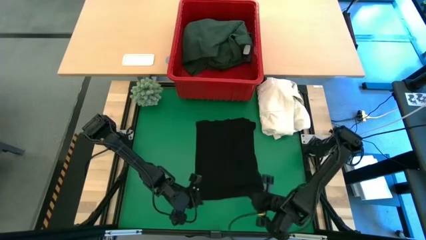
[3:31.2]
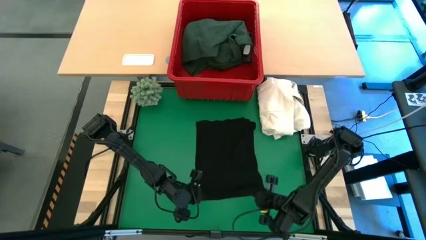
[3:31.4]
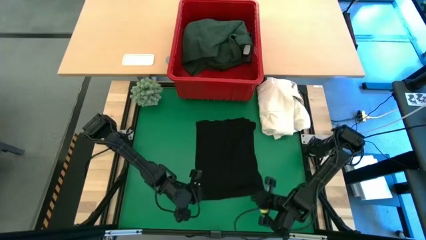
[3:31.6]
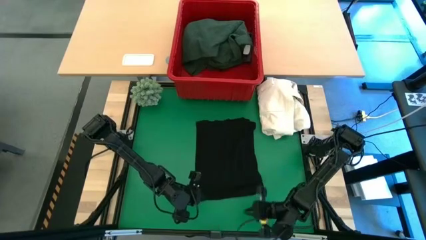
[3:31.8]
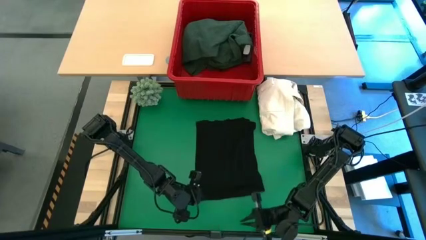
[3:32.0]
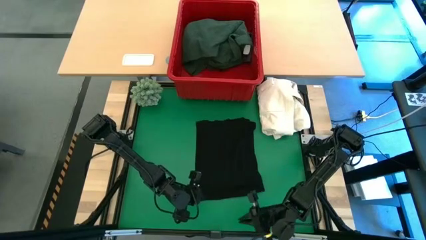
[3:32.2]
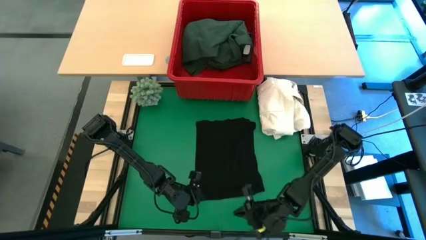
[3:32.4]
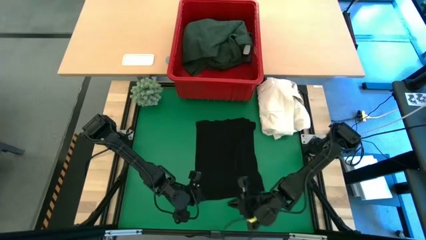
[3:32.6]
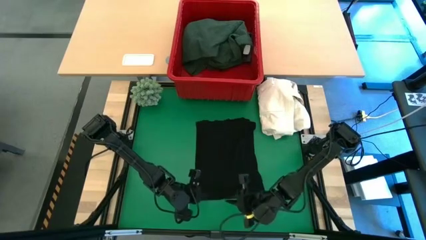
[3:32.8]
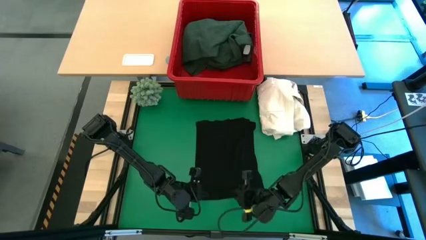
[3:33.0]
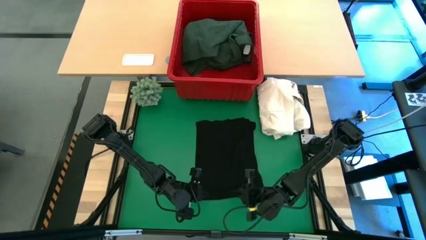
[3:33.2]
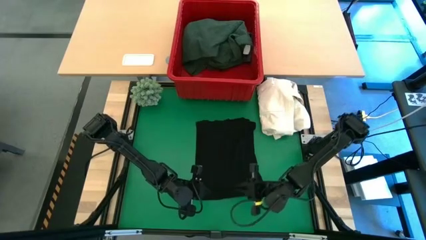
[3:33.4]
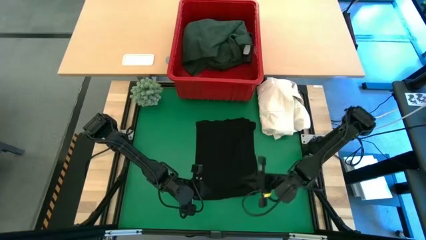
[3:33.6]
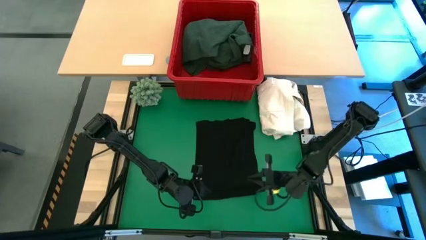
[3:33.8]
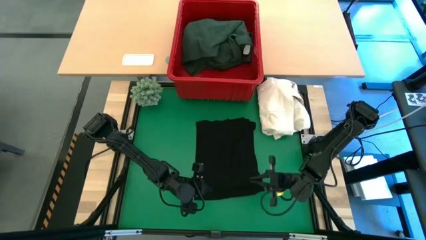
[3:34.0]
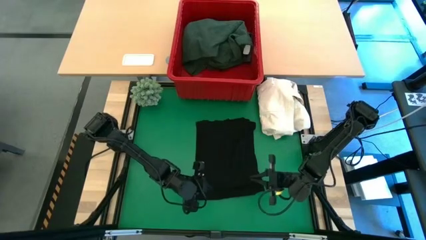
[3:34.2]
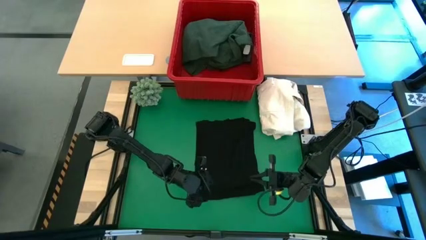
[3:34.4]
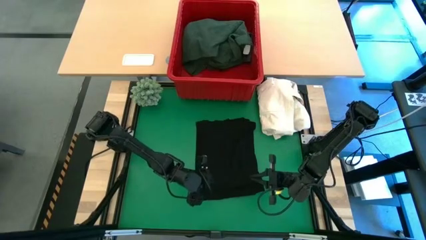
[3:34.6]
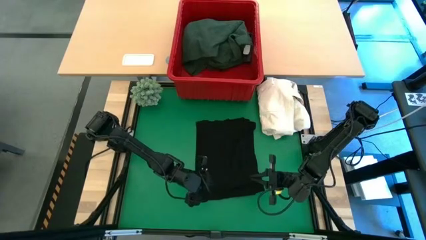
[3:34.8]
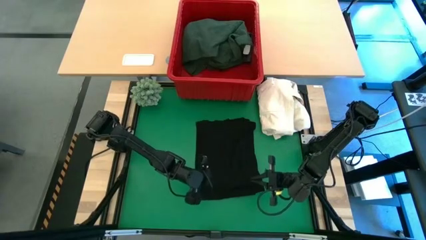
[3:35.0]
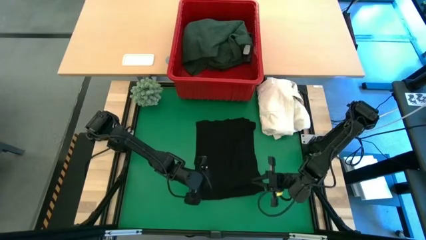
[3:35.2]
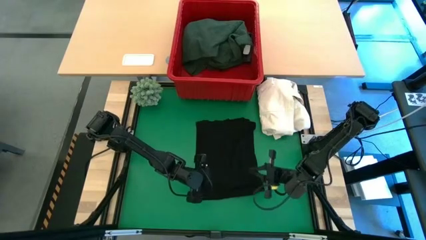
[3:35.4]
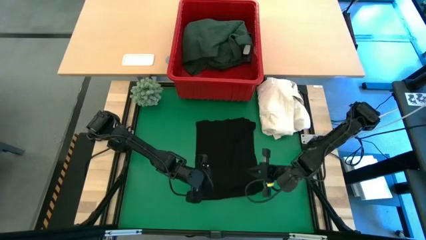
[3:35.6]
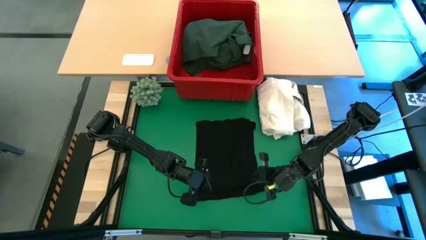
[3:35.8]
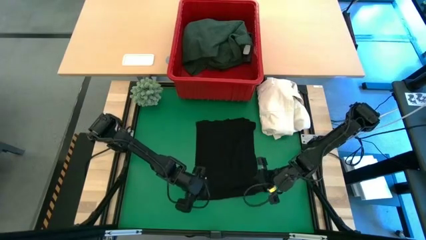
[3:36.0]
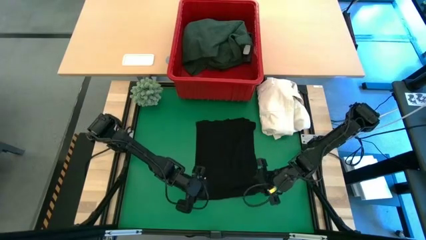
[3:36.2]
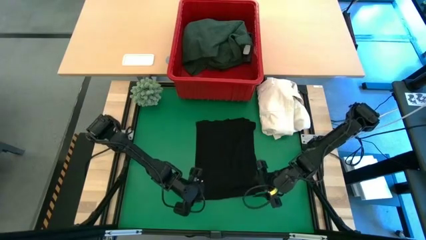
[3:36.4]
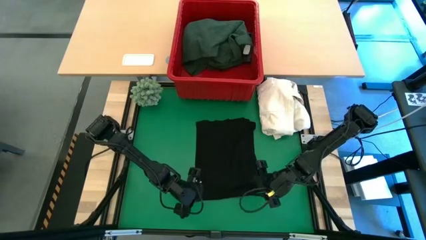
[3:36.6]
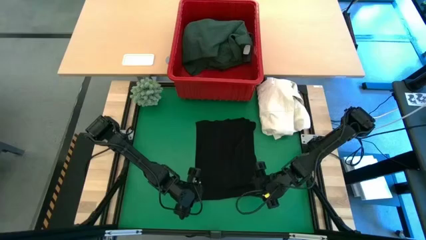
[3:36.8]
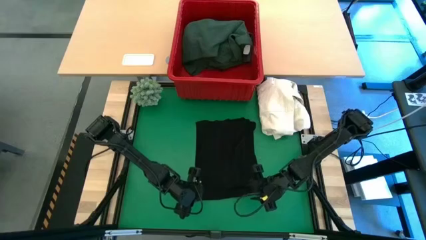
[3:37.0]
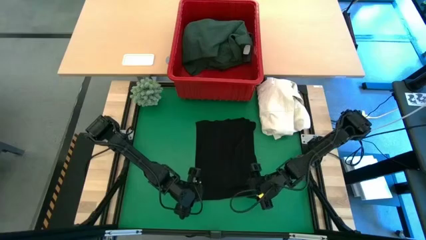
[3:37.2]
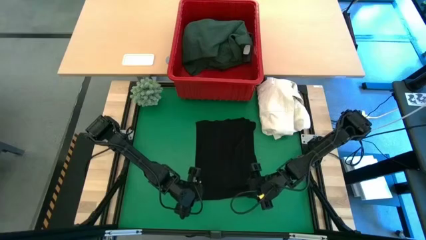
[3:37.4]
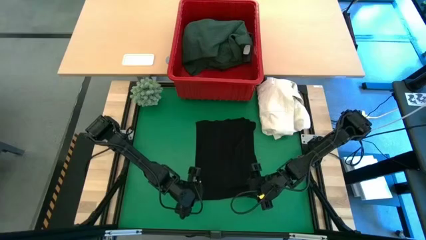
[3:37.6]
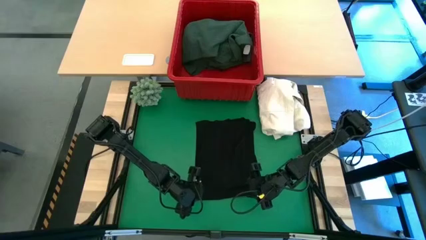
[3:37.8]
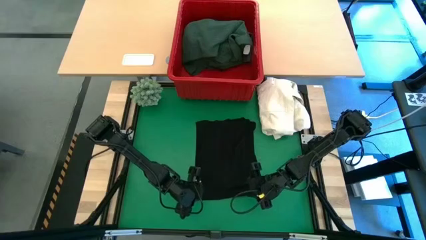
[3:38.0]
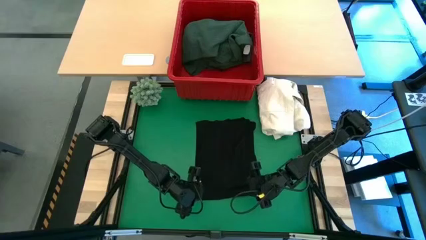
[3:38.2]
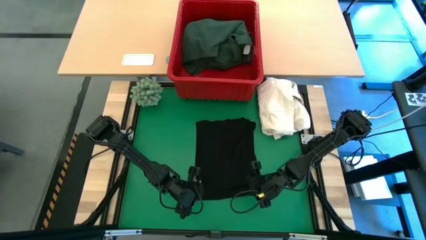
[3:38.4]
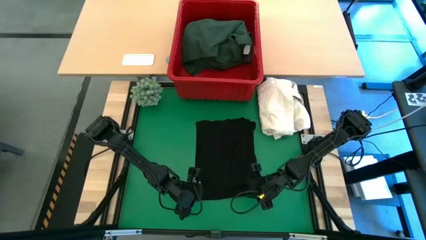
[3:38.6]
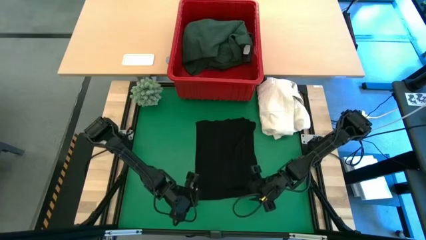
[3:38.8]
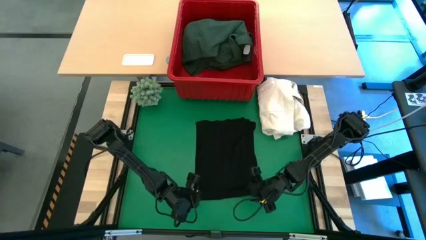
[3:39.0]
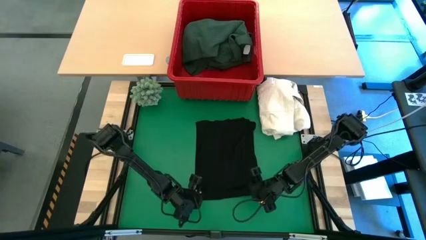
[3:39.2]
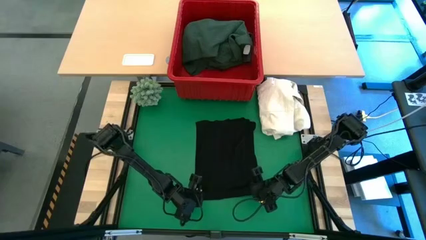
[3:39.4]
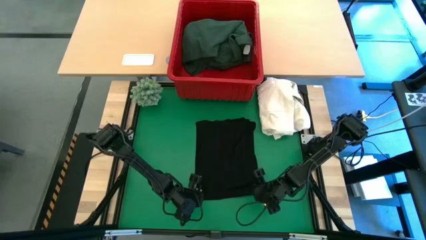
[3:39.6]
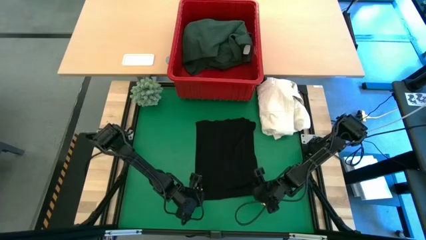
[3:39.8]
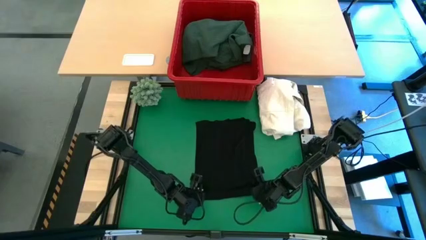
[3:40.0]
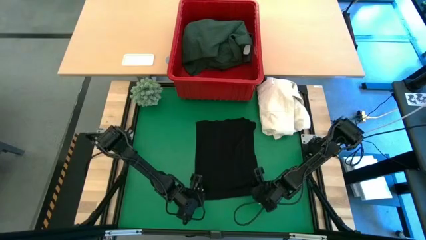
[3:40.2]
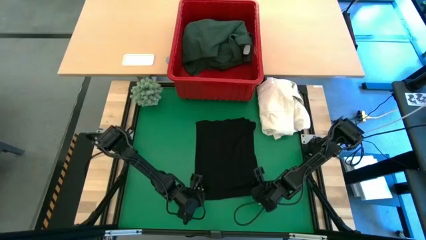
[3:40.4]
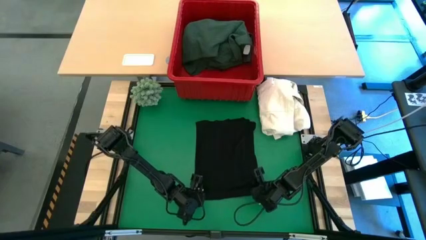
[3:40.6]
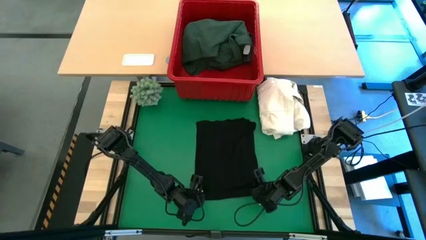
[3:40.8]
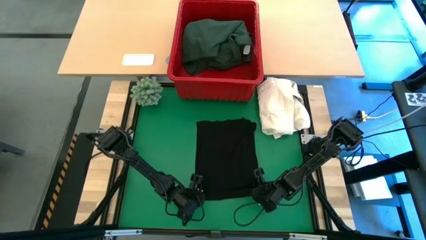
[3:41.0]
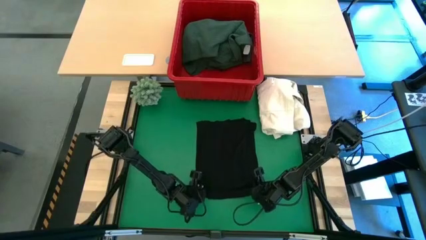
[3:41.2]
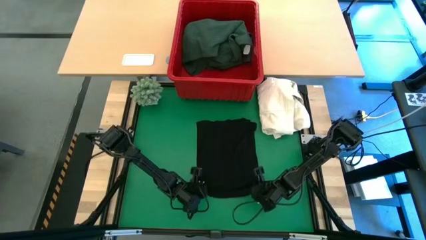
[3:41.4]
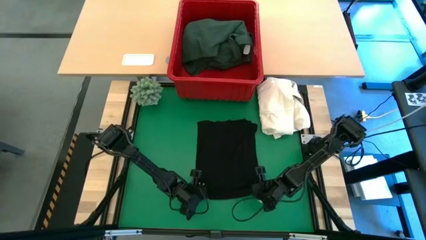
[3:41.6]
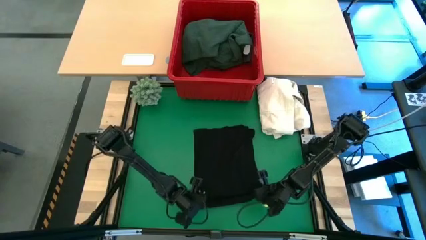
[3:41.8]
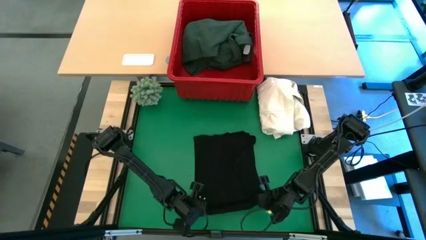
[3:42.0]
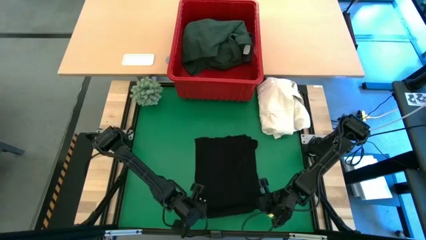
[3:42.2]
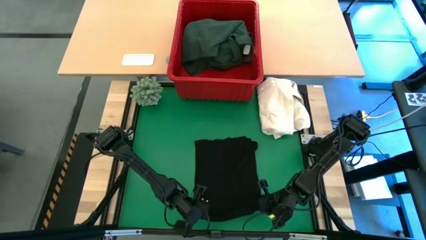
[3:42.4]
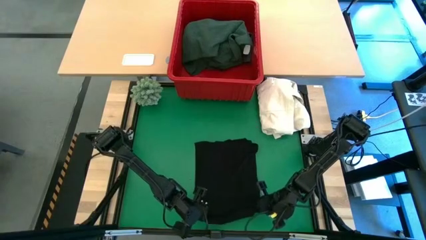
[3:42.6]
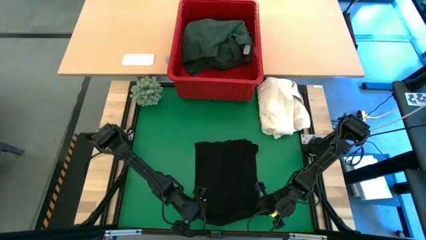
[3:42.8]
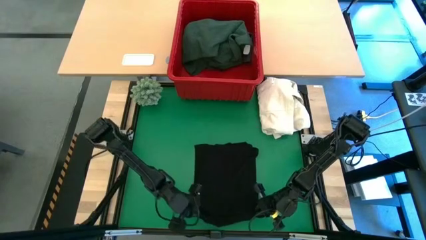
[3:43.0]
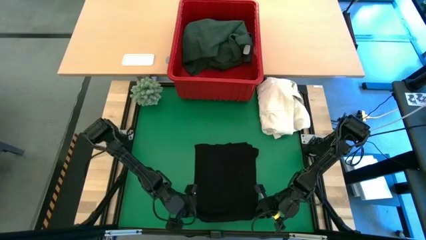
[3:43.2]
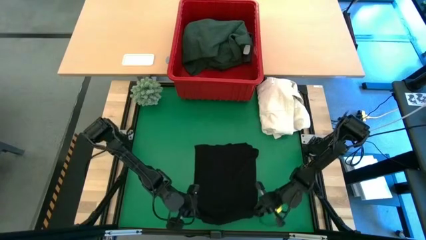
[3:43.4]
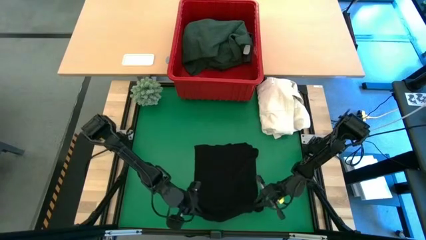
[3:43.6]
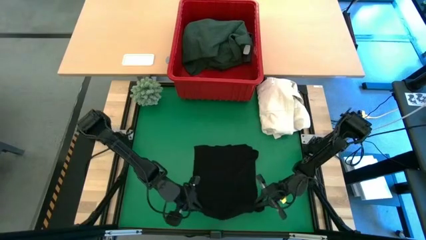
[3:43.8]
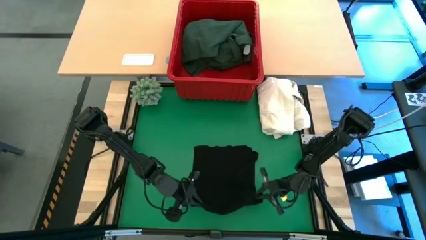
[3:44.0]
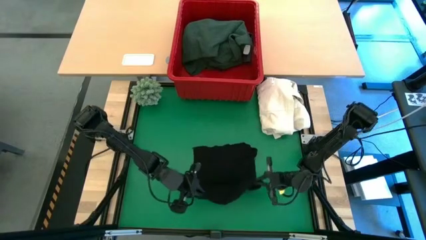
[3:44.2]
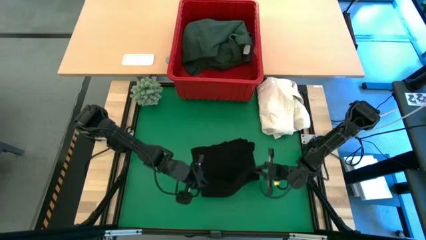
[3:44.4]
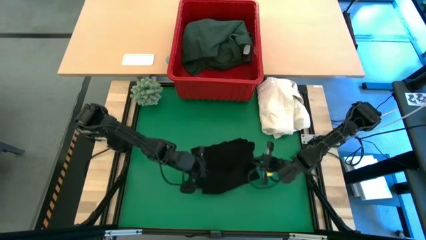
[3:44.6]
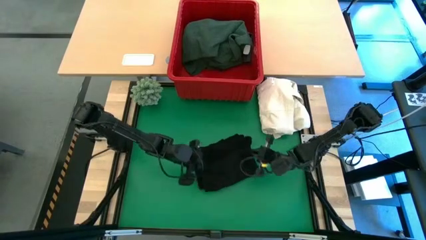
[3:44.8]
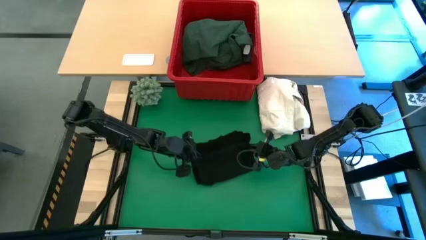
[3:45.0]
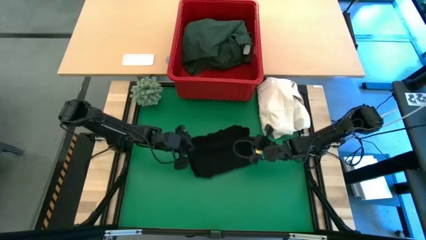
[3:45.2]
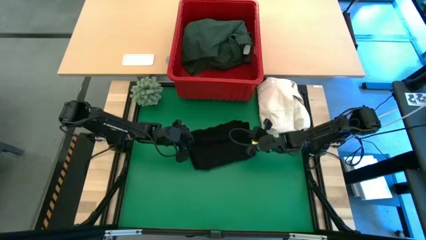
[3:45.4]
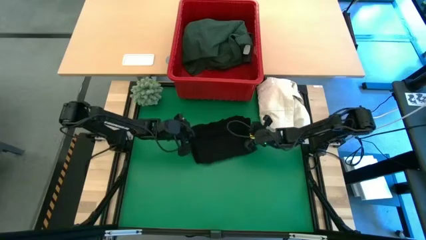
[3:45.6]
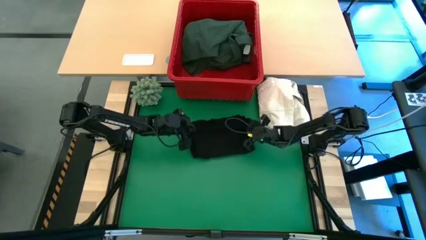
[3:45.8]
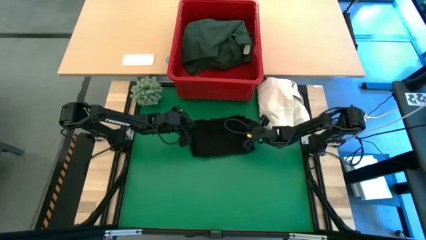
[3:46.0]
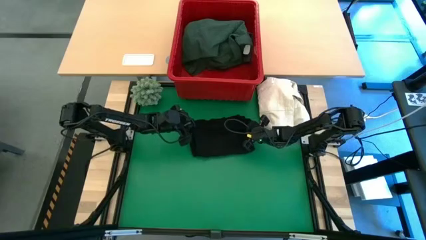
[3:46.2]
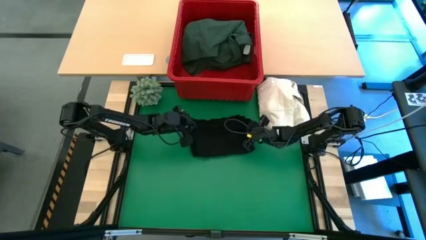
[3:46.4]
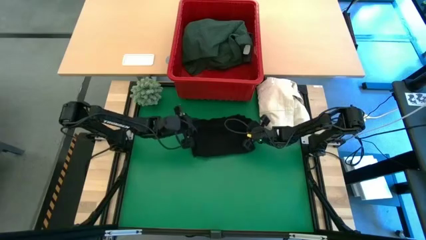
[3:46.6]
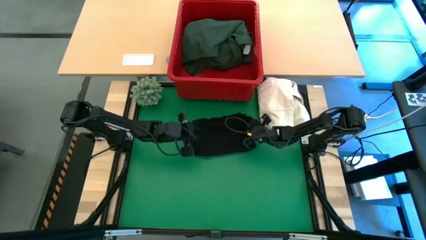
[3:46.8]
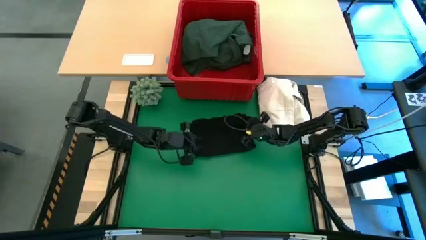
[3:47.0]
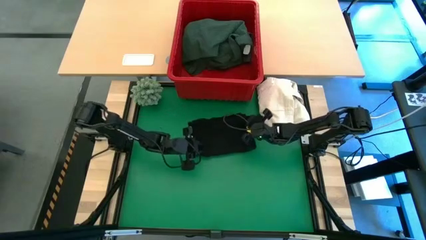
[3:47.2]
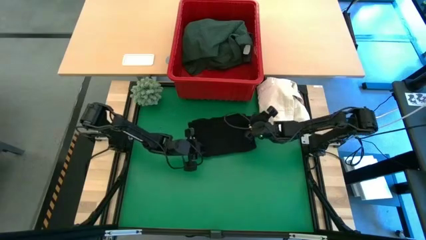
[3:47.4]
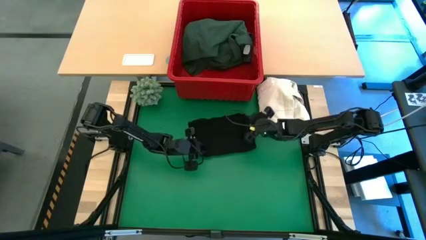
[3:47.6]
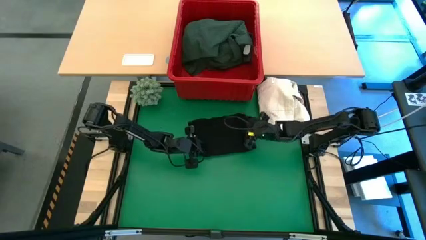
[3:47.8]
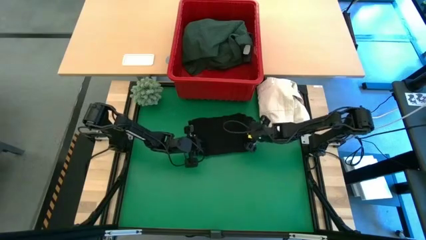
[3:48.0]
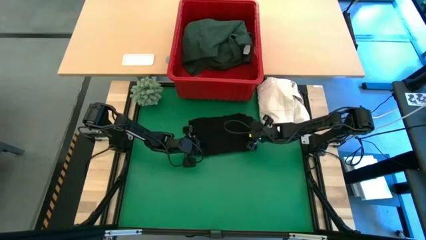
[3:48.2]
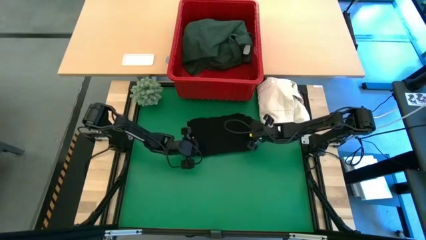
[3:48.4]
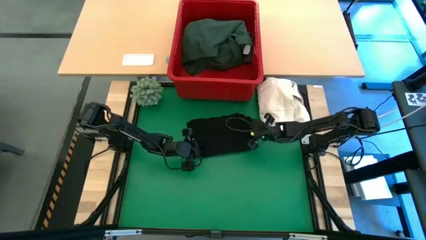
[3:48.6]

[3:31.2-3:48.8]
Task: Fold laundry
Fold the black shirt
